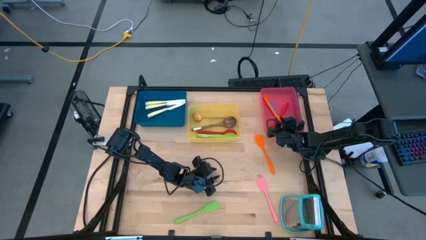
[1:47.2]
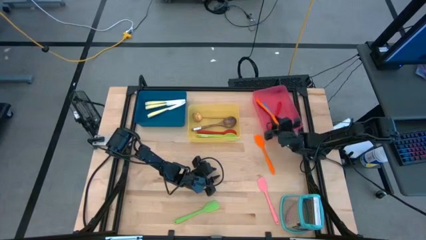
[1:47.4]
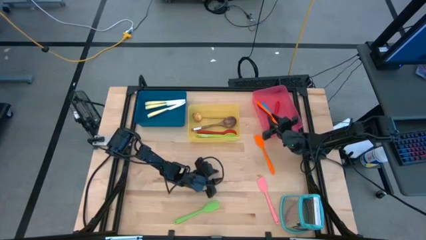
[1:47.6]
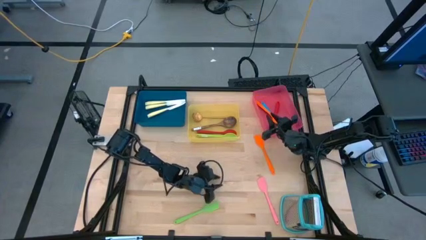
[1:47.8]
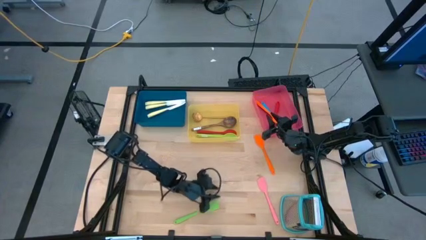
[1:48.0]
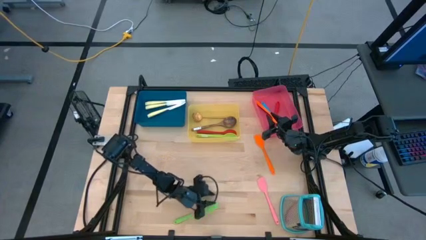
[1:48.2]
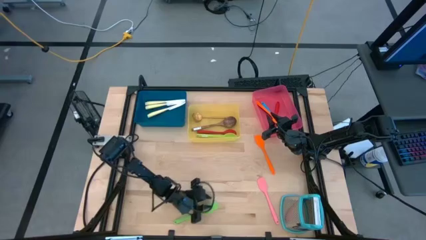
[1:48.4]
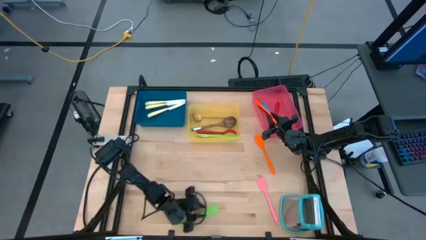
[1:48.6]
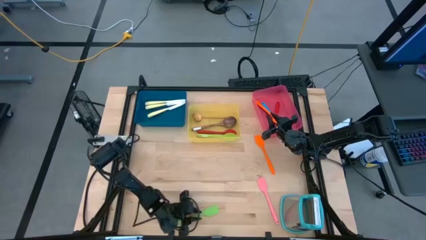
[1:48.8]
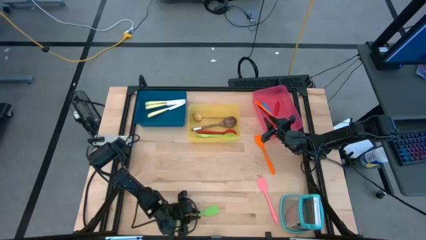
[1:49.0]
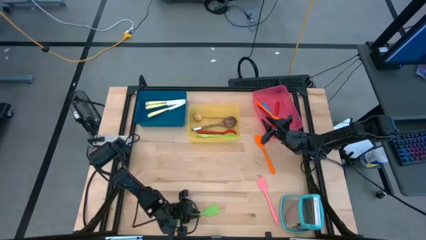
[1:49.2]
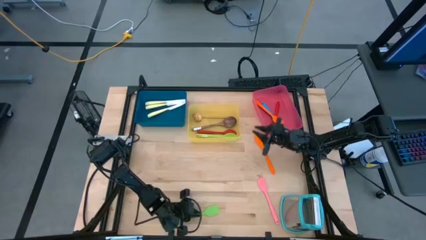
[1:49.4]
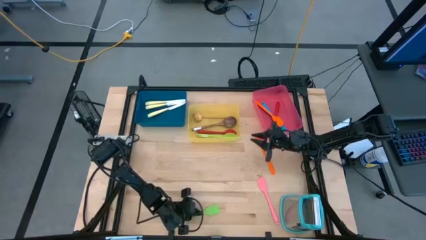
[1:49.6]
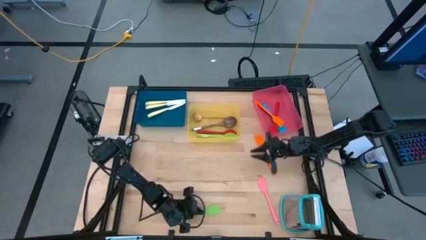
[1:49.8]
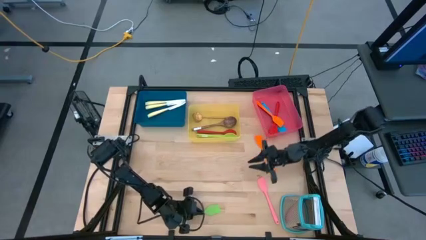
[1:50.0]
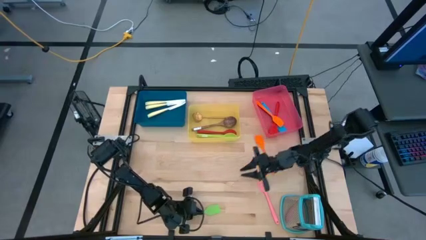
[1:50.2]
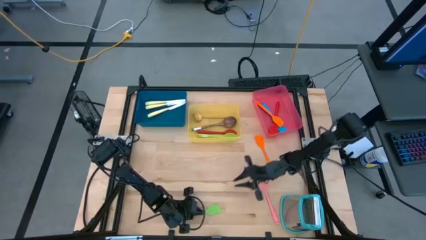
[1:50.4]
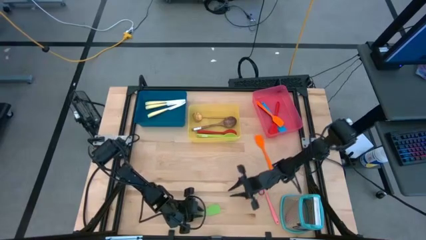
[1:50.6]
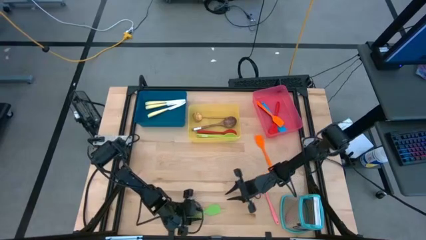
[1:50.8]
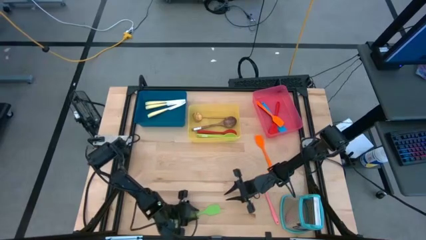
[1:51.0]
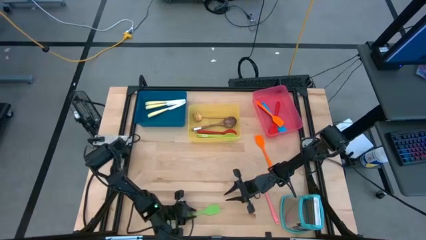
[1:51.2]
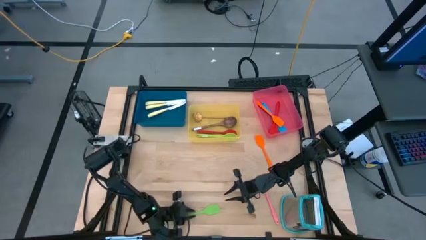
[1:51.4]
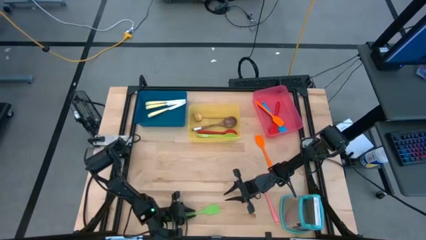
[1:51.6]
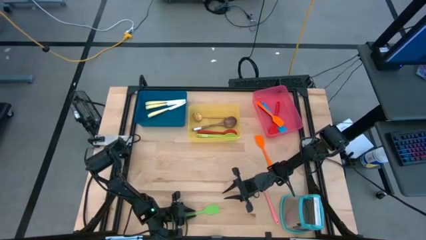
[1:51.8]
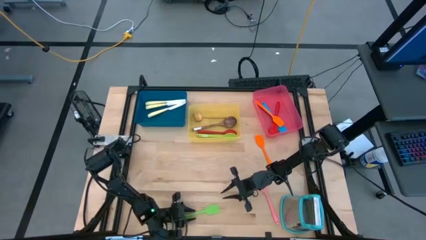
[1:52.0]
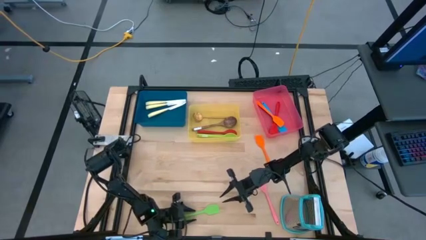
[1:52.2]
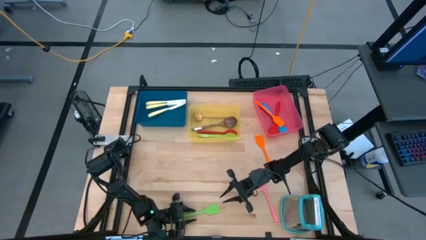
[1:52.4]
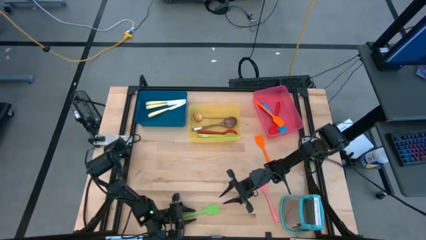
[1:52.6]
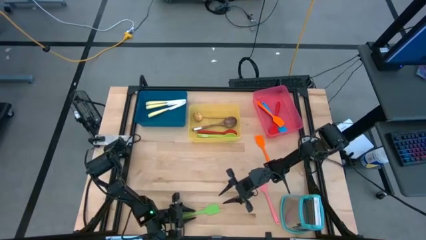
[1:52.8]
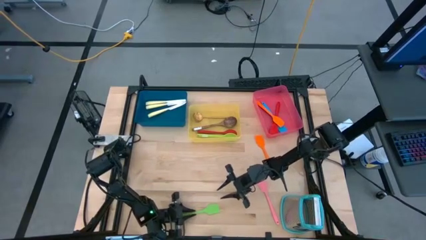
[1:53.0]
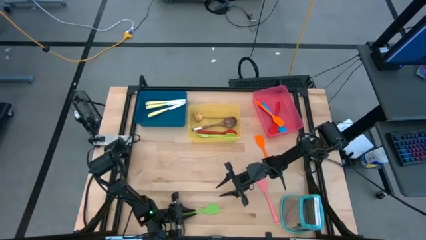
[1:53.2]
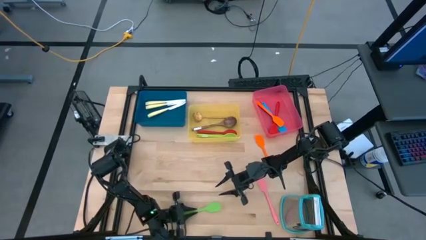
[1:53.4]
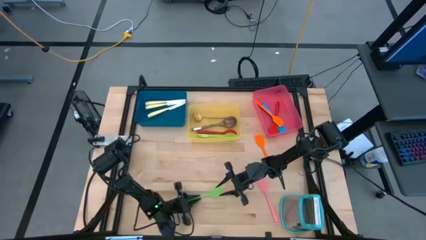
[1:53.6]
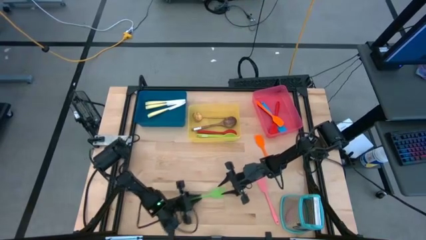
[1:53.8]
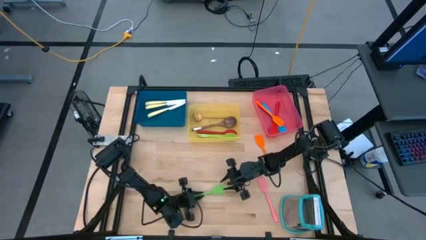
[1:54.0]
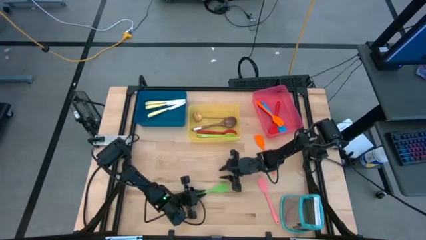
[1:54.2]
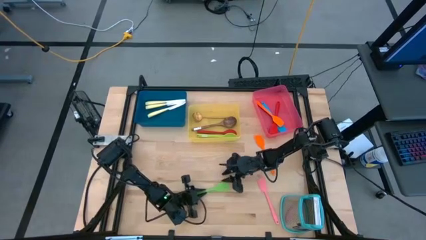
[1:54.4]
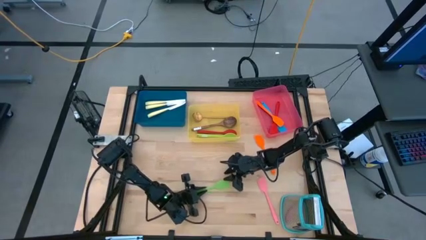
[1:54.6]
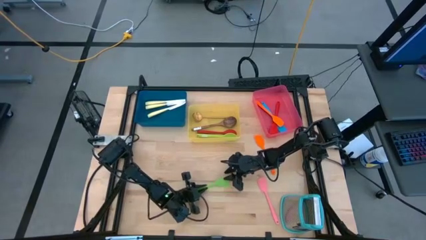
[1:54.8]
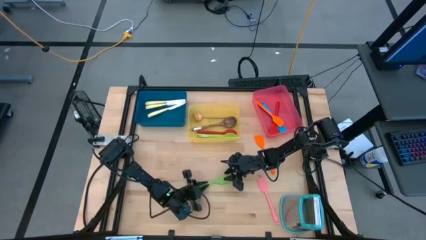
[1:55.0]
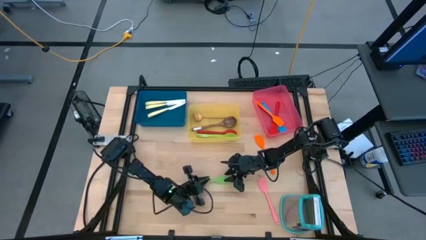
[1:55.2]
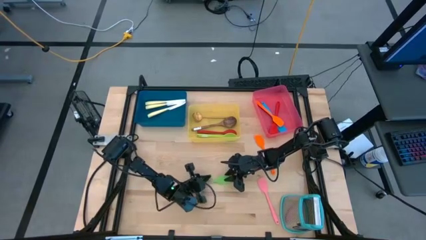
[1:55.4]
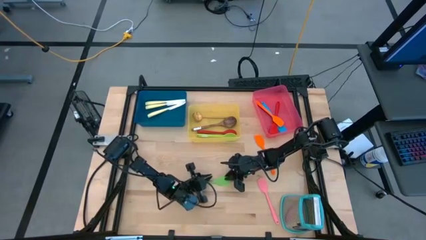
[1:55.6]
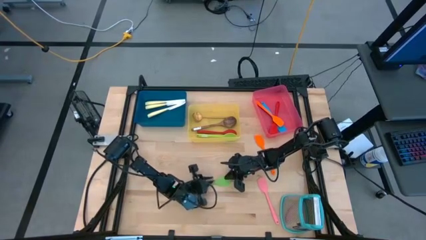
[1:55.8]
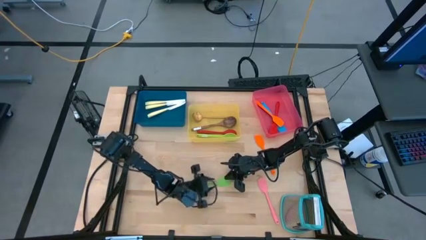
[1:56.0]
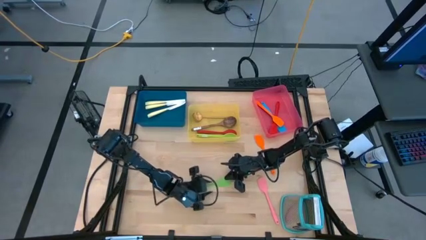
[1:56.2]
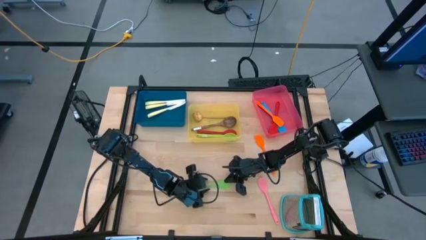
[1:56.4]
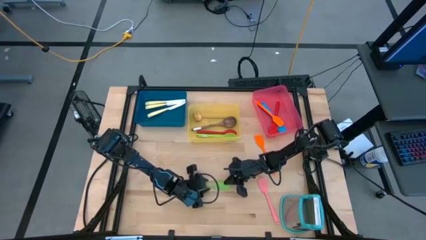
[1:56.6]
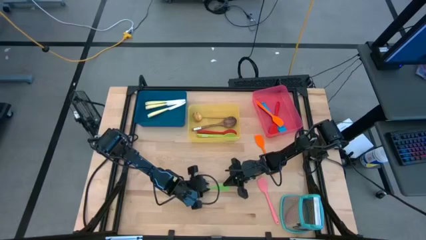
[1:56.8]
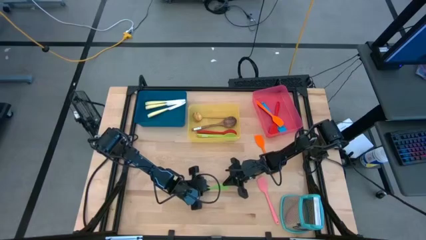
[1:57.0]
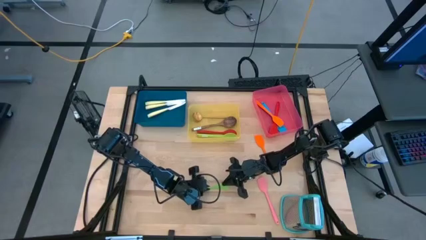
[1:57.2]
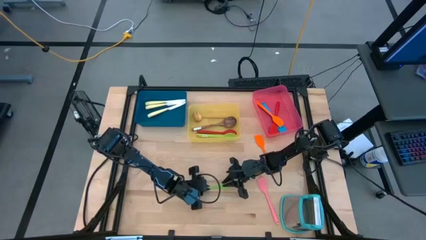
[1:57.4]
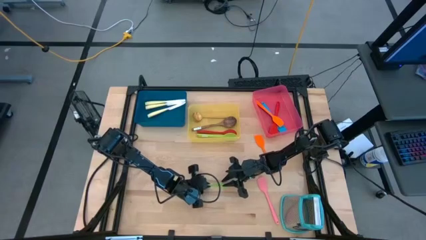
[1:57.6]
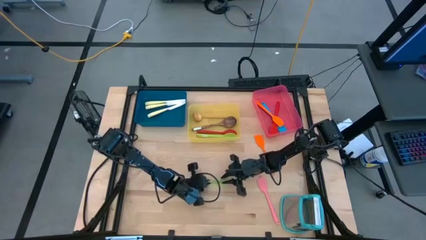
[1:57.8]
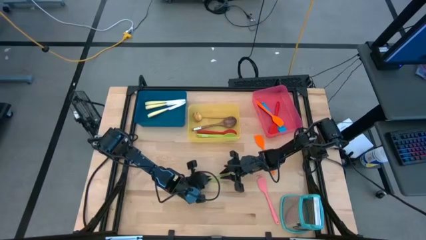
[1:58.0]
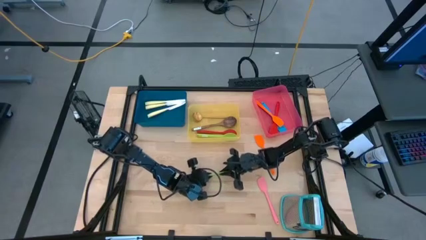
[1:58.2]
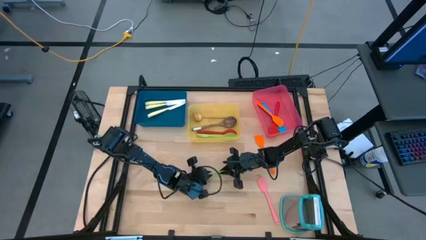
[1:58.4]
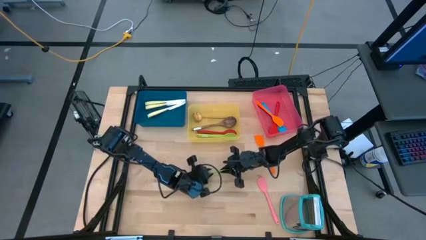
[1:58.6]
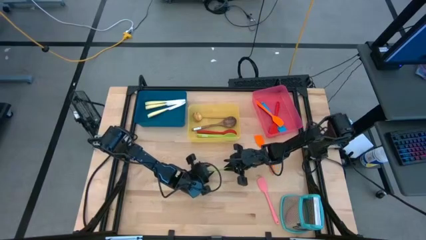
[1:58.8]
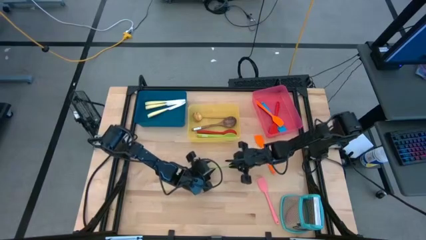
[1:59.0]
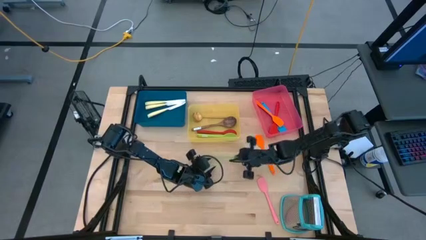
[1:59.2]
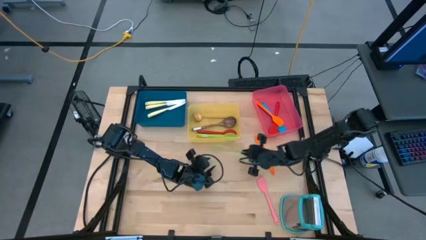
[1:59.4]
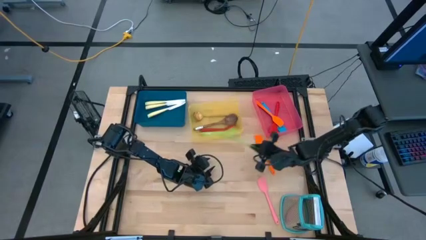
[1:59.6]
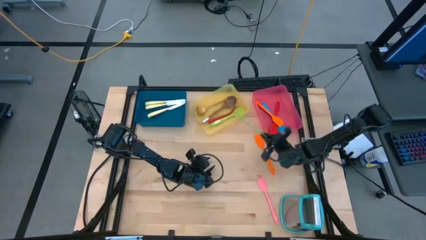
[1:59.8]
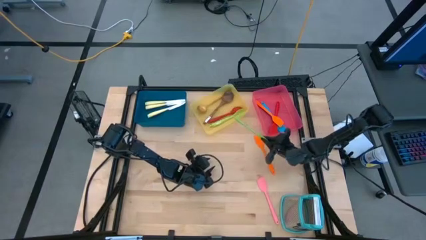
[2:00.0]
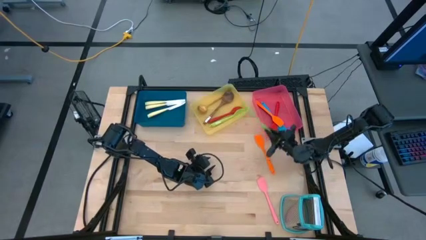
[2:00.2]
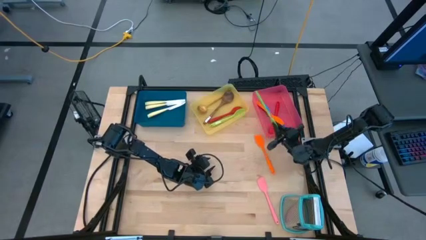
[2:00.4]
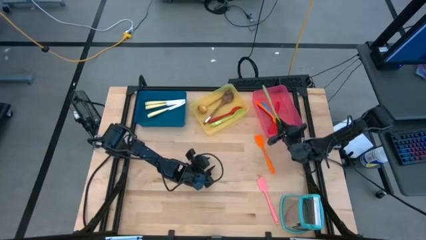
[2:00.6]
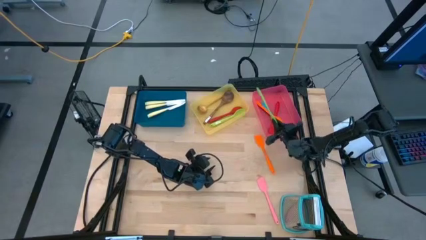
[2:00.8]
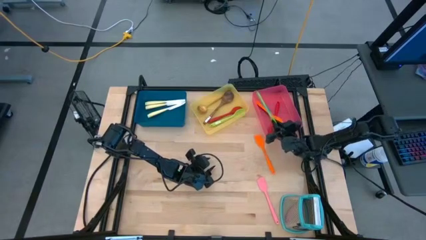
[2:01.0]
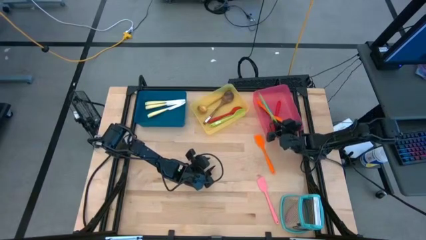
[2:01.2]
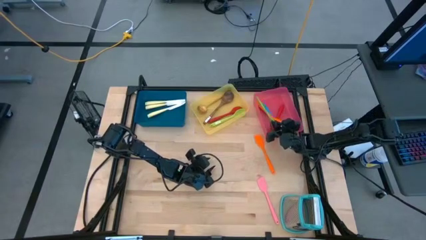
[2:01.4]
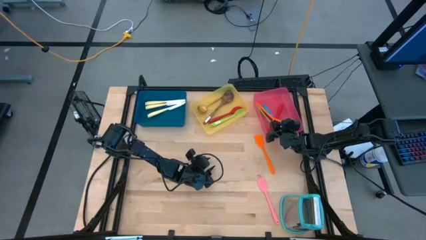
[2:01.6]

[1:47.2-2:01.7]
Task: Pick & Place Kitchen Items
Put the green spatula into the red bin

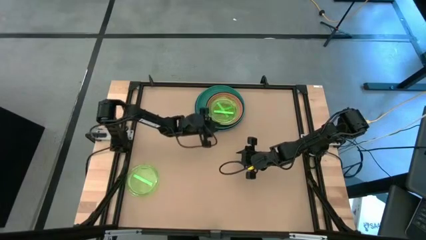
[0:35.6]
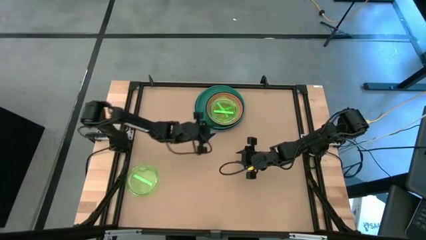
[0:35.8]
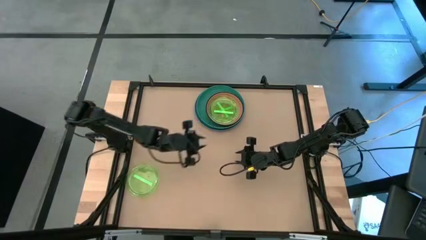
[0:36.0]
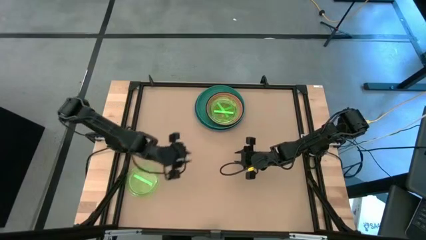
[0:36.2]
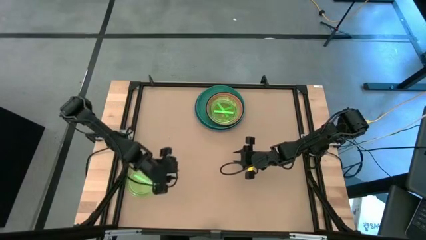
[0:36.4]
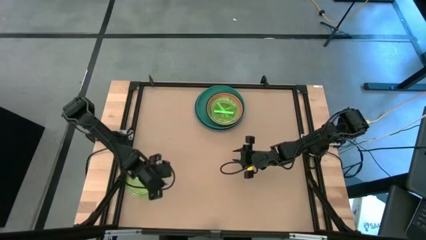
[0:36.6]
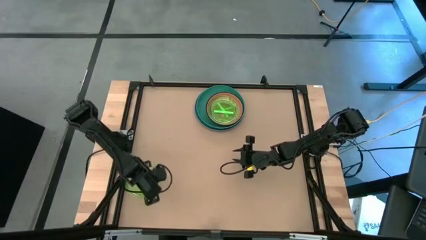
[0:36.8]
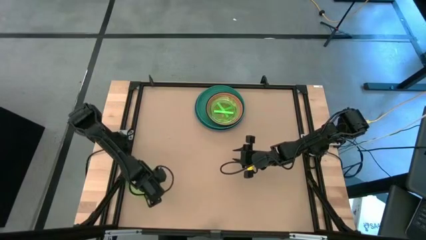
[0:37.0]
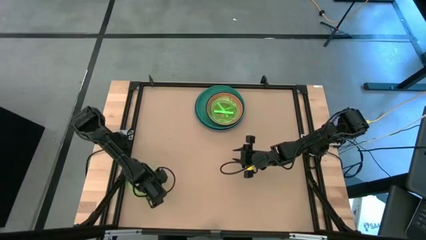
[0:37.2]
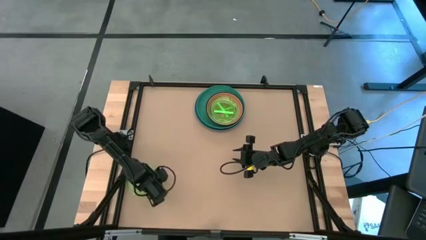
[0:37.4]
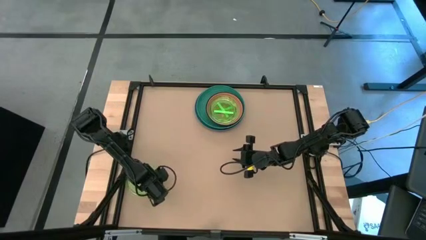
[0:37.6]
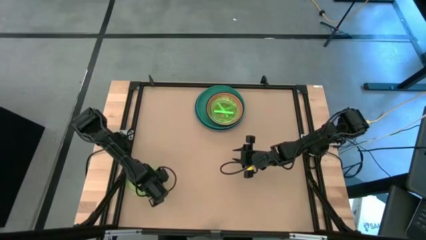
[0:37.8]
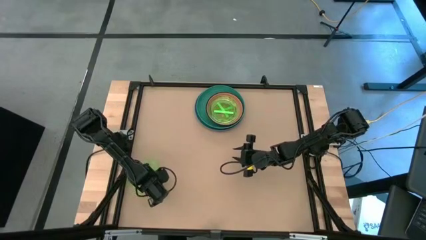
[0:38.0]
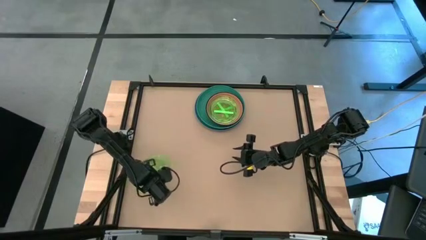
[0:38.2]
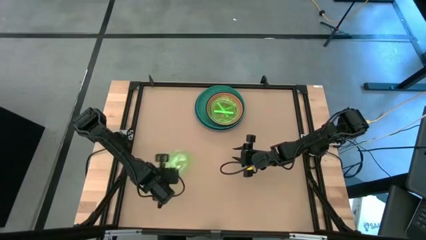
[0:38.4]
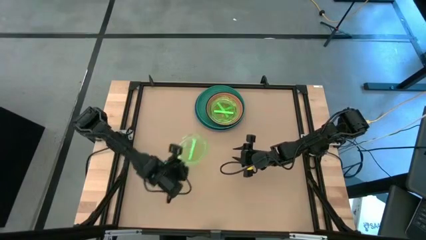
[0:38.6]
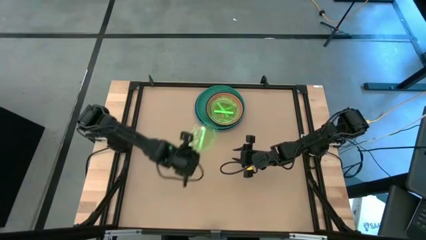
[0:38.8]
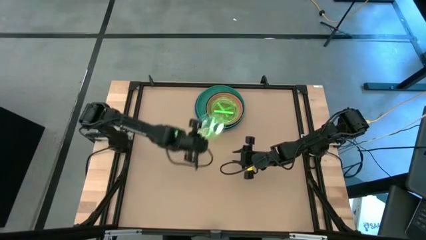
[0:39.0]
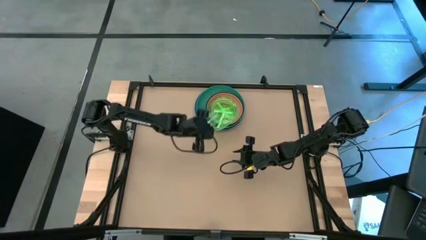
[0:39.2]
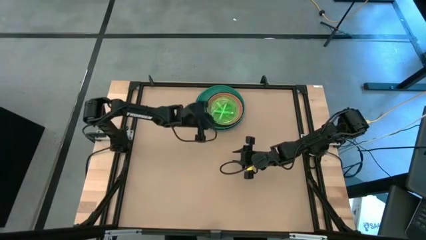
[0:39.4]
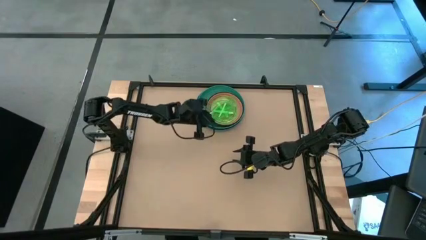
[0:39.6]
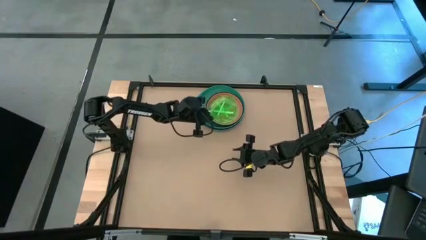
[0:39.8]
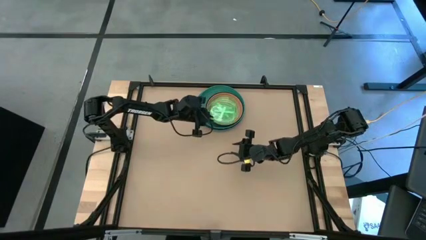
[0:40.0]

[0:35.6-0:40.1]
Task: Stack plastic plates
Stack the green transparent plate on top of the green transparent plate
